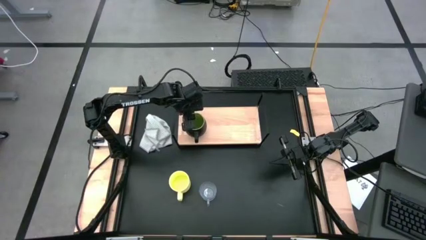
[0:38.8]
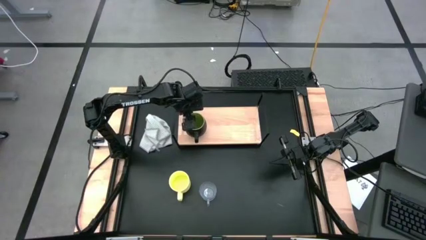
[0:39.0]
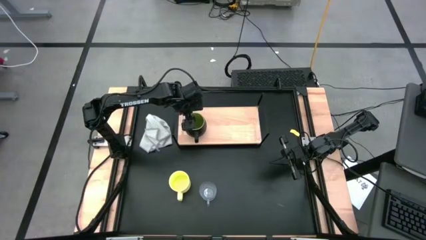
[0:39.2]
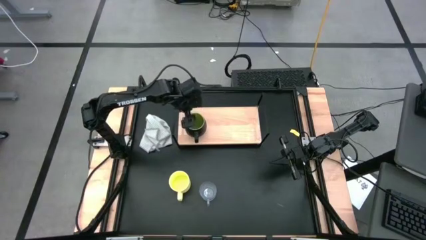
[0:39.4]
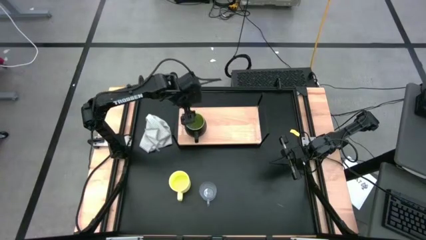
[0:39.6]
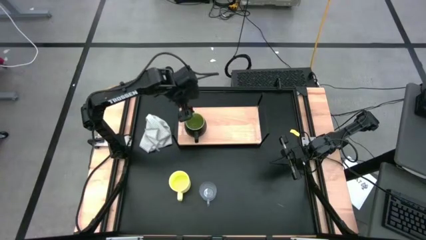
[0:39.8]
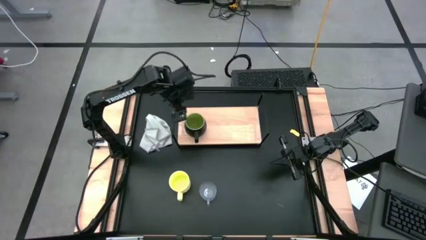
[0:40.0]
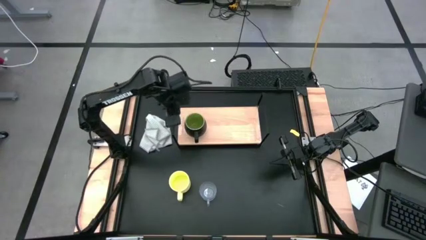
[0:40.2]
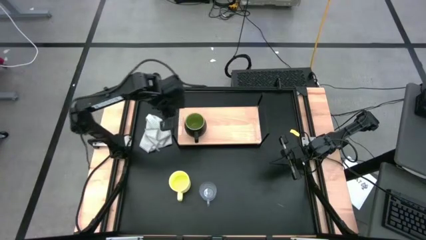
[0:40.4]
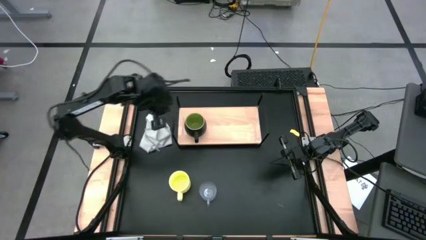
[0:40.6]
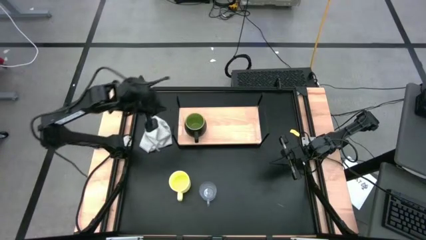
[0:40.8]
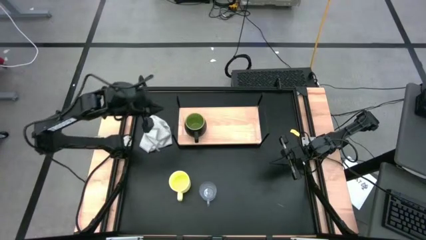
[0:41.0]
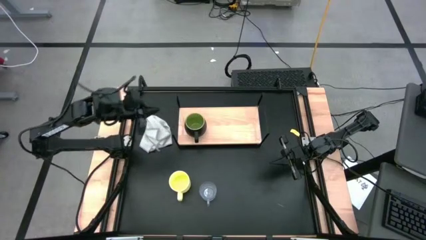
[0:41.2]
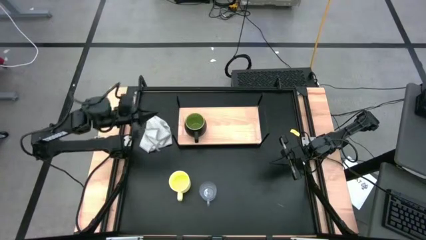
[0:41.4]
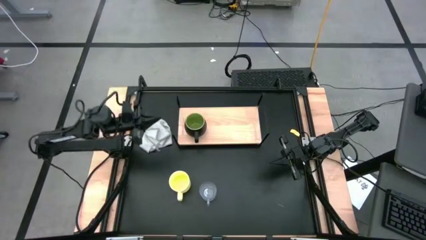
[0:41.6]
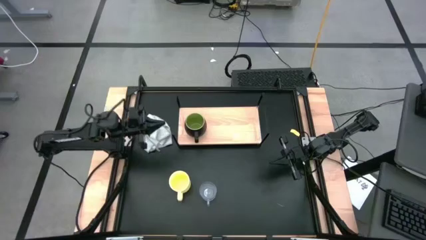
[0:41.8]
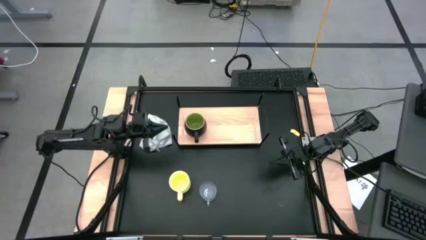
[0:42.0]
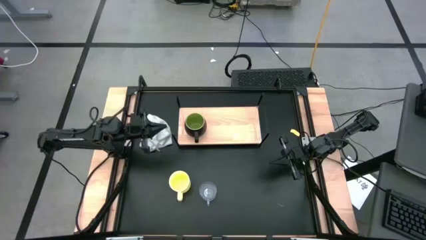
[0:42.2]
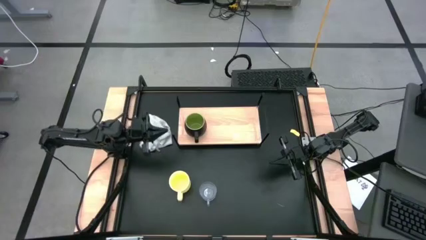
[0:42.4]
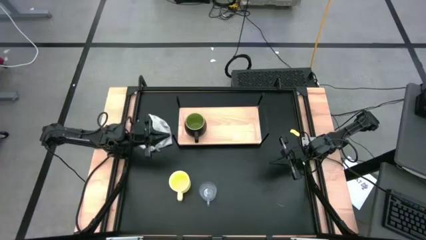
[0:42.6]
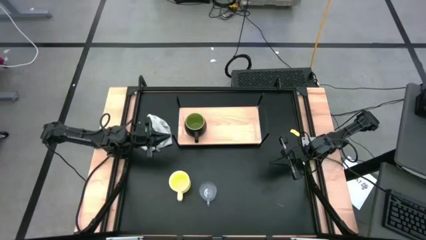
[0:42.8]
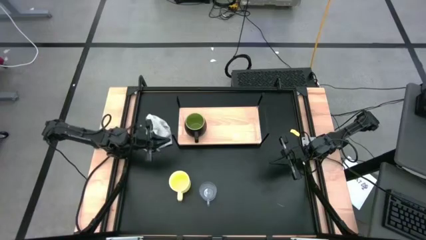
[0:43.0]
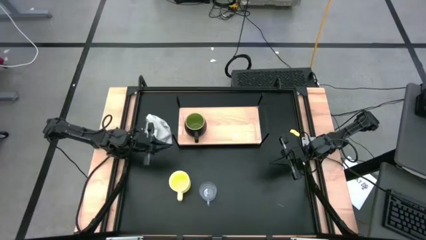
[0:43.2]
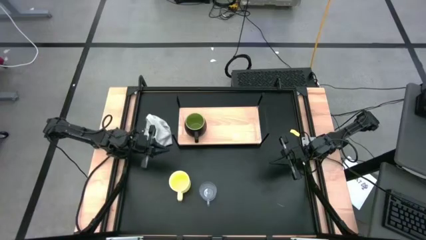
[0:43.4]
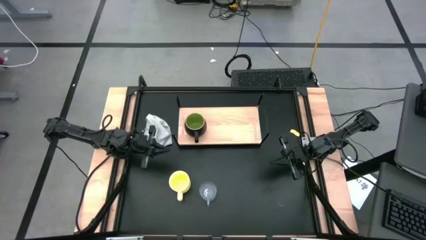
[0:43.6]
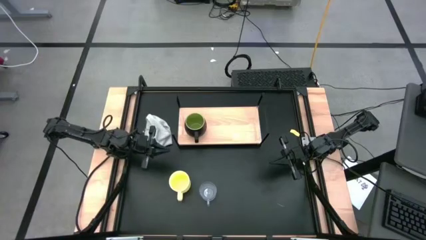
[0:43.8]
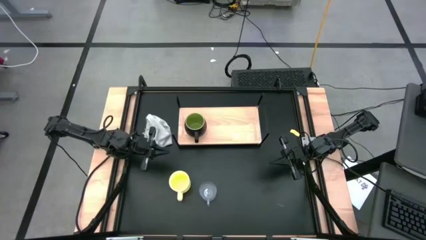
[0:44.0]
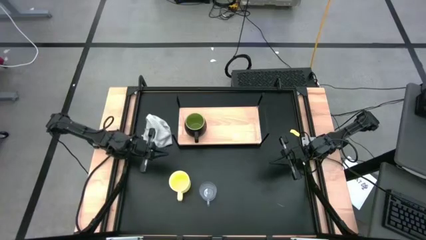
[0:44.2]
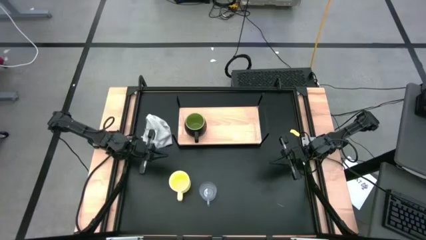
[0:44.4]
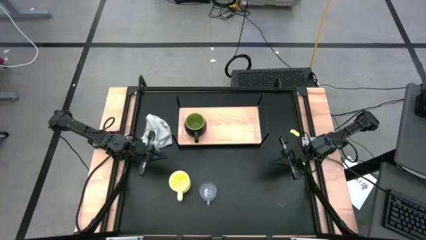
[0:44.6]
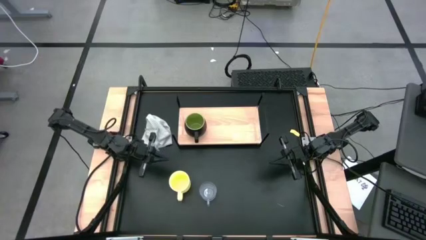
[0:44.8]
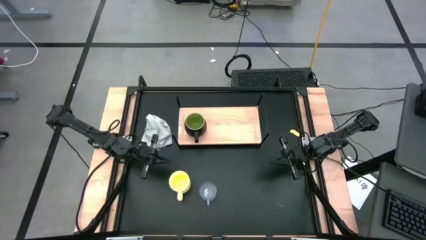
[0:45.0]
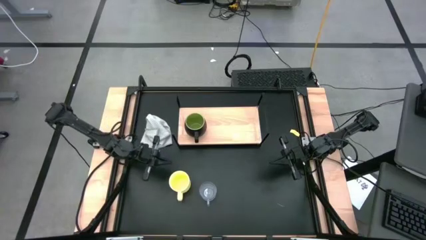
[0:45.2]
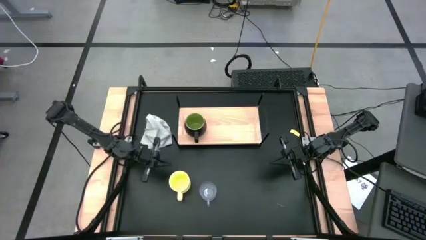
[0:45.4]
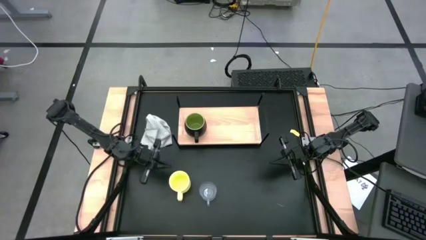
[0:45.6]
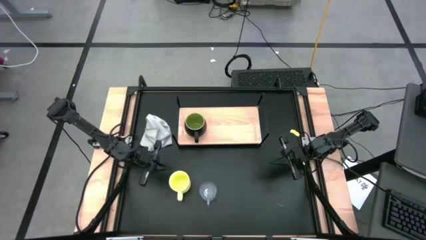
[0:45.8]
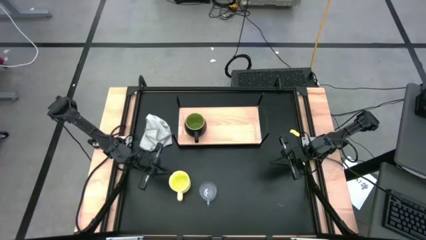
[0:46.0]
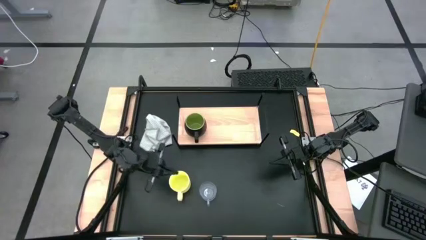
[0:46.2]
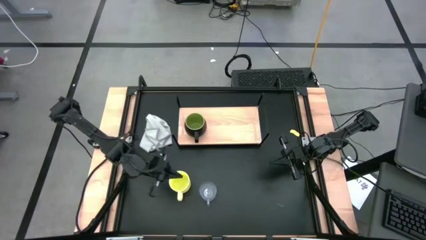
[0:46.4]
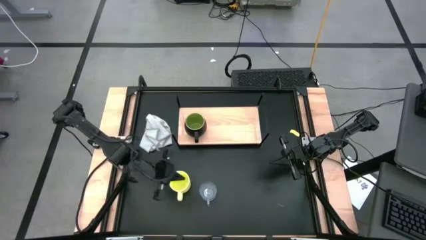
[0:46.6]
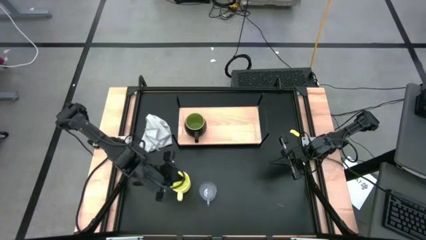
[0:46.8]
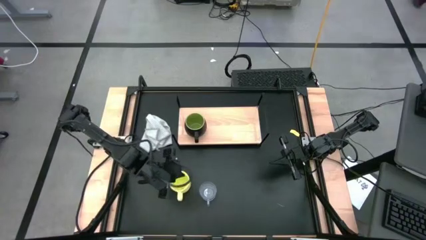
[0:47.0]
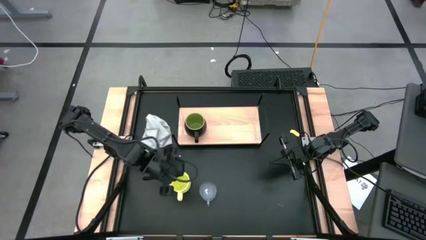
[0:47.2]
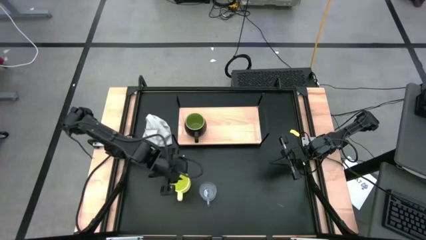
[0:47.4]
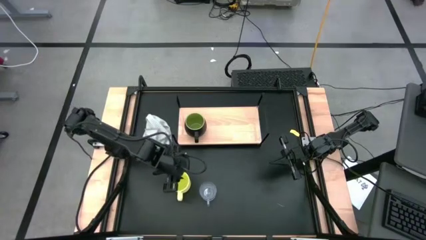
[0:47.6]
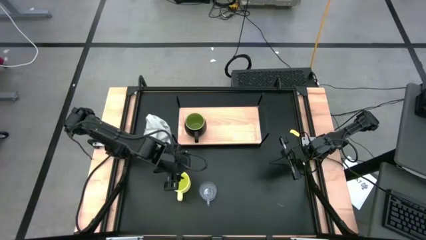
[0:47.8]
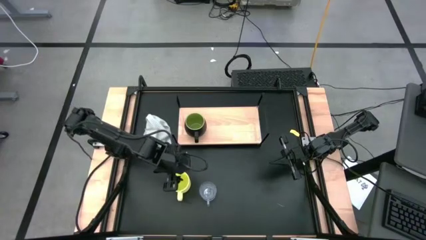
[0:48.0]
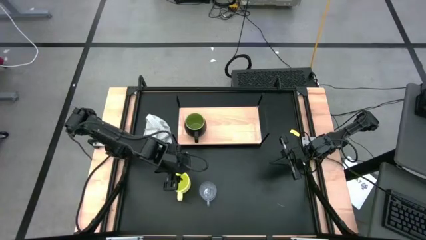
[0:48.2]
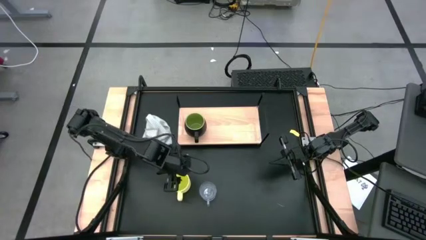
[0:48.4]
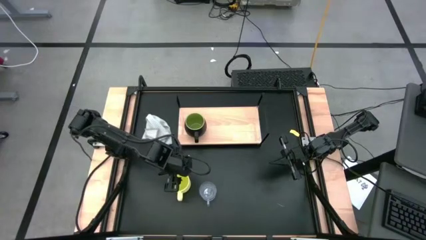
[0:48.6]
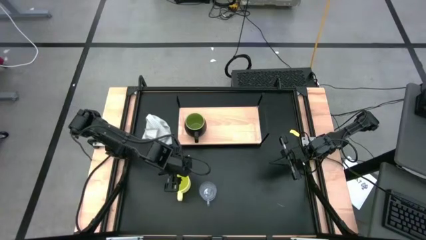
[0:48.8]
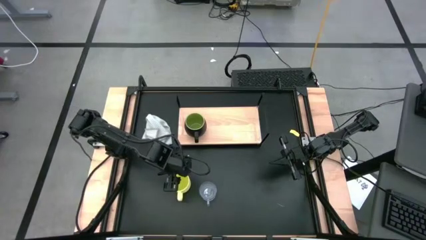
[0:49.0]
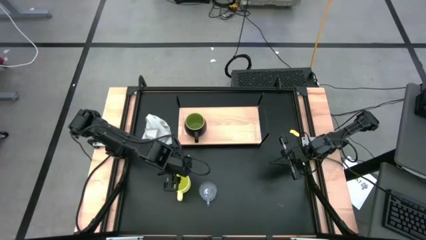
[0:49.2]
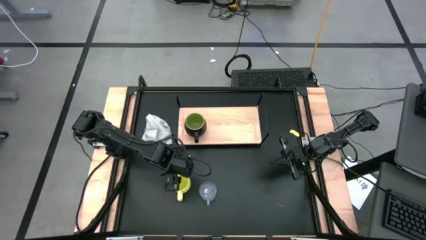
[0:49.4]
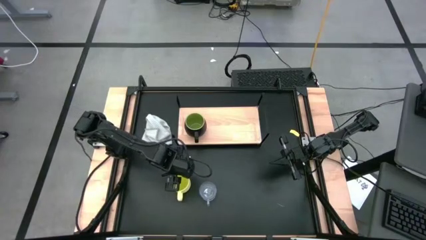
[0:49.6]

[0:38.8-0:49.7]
Task: Stack small to large cups/mugs on shelf
Put the yellow mug on the shelf
